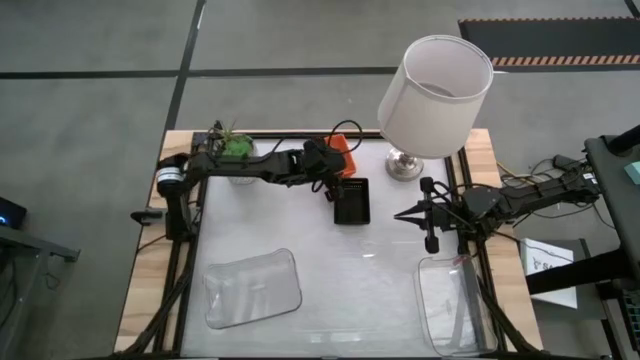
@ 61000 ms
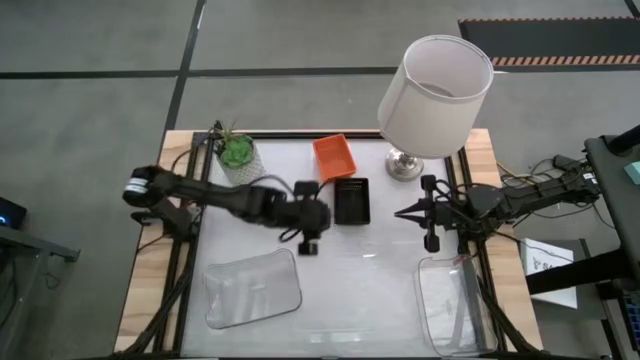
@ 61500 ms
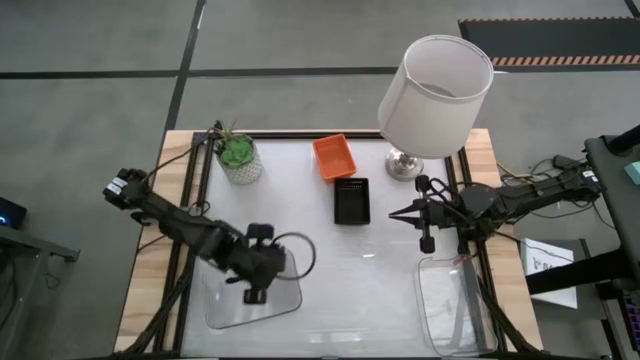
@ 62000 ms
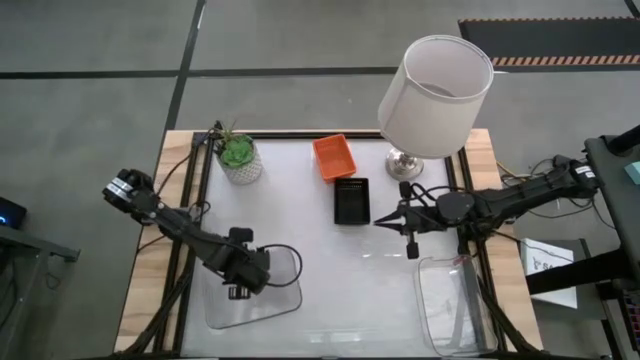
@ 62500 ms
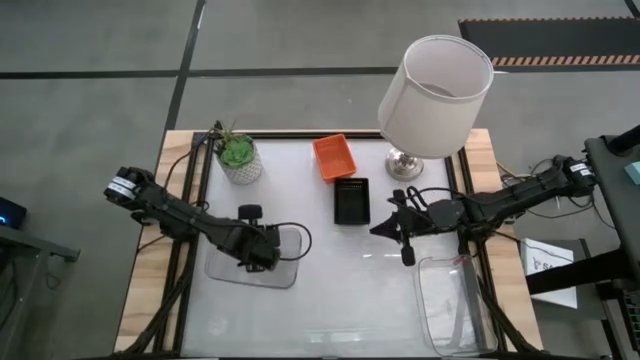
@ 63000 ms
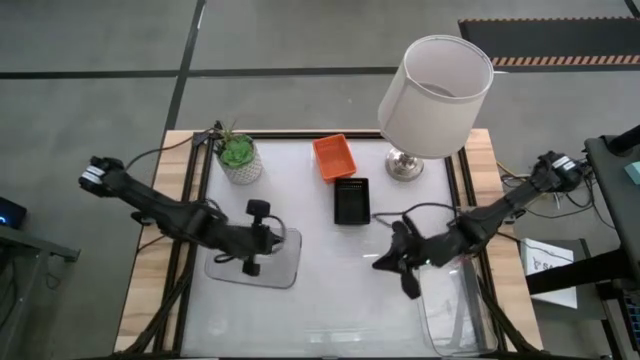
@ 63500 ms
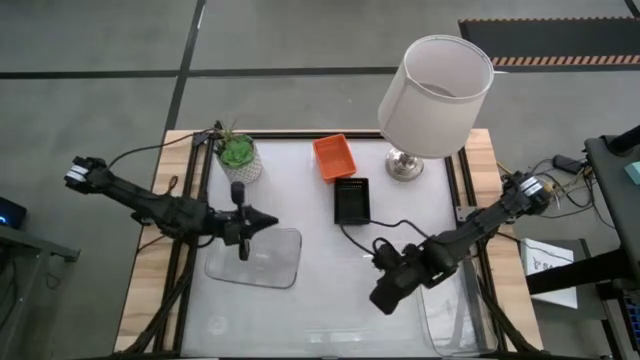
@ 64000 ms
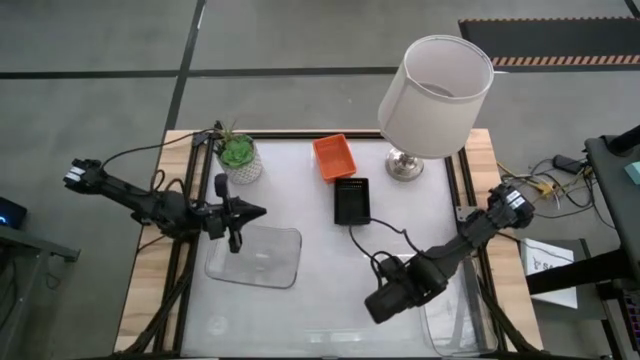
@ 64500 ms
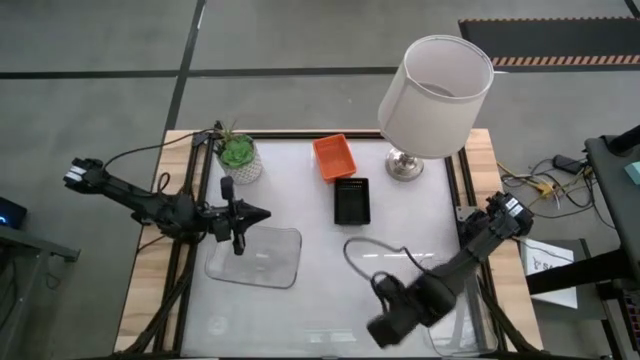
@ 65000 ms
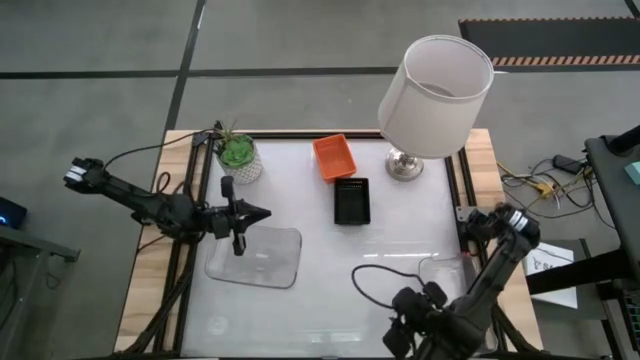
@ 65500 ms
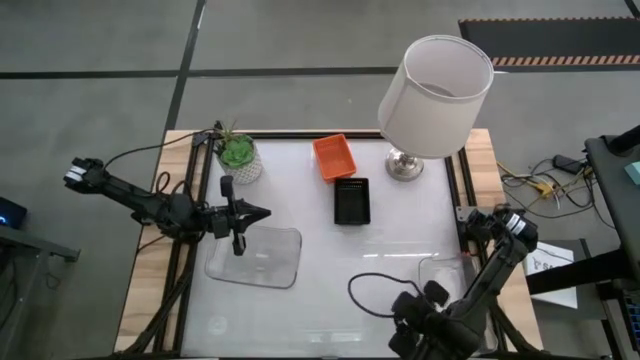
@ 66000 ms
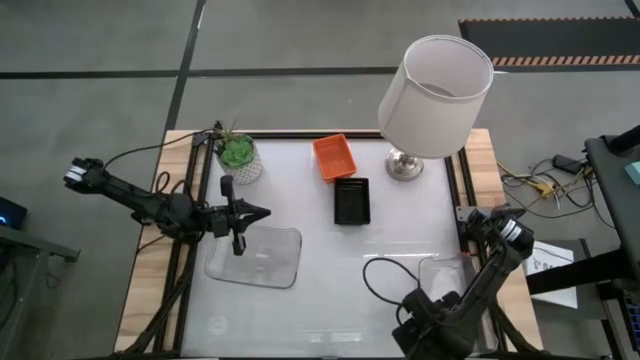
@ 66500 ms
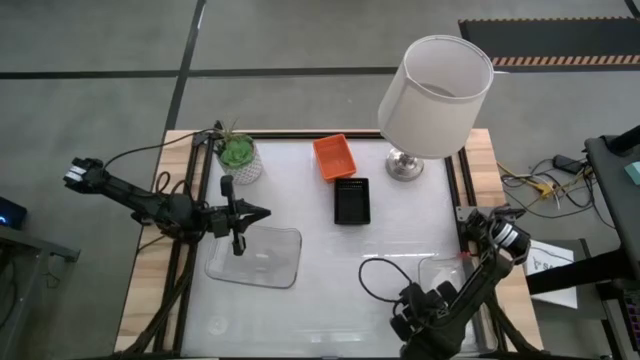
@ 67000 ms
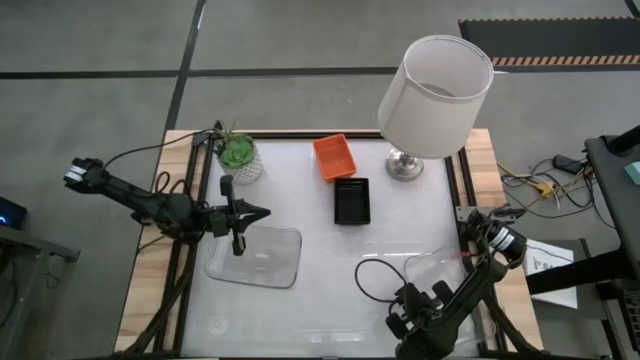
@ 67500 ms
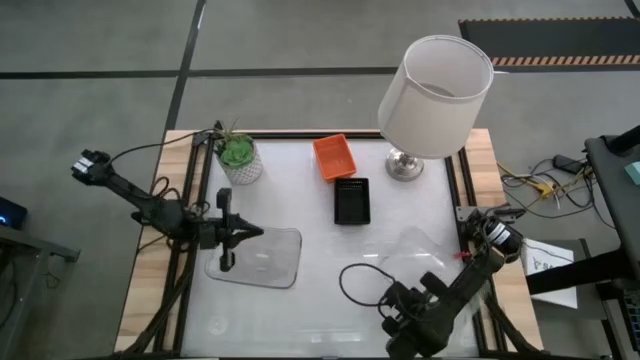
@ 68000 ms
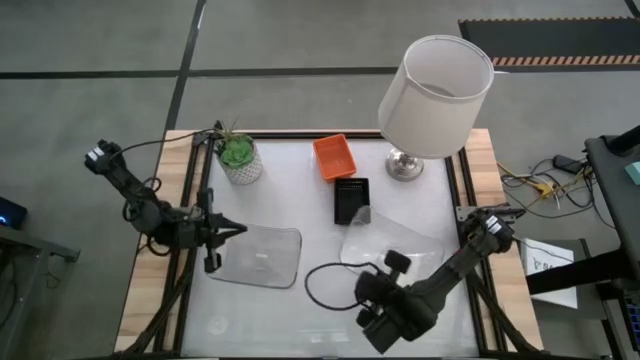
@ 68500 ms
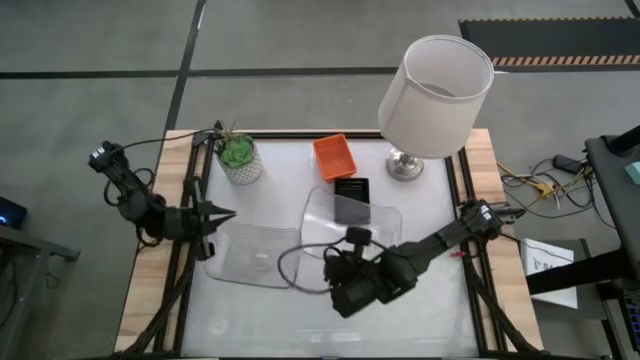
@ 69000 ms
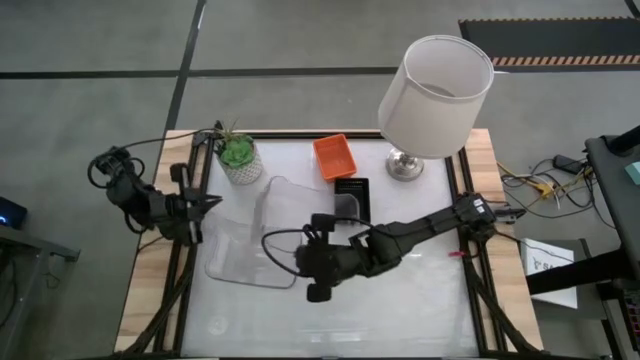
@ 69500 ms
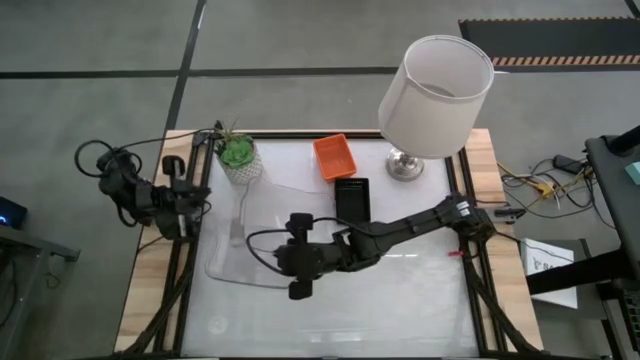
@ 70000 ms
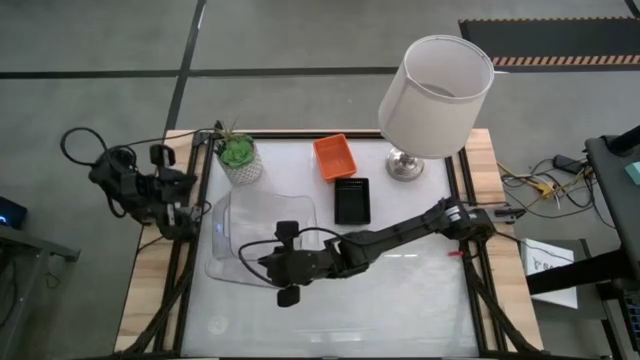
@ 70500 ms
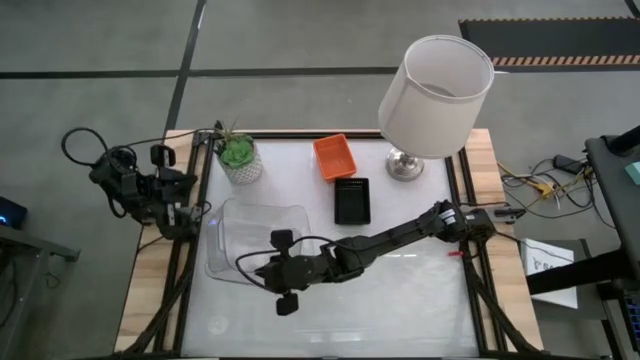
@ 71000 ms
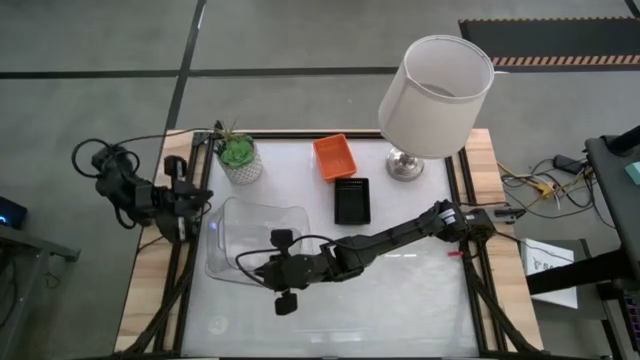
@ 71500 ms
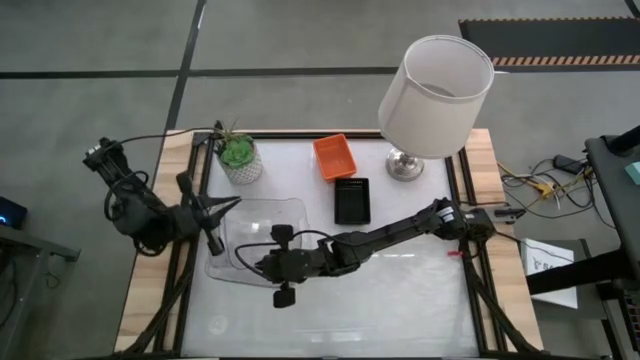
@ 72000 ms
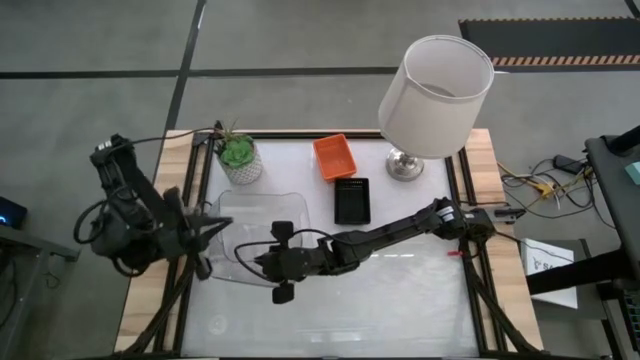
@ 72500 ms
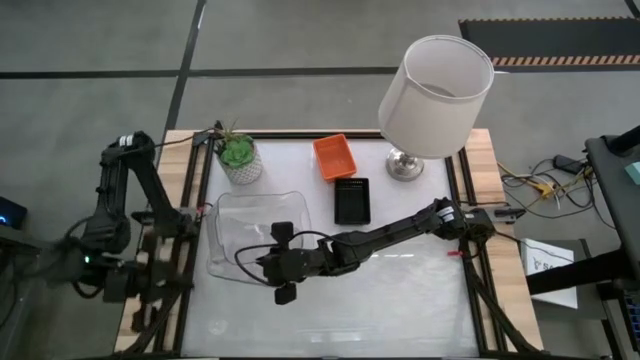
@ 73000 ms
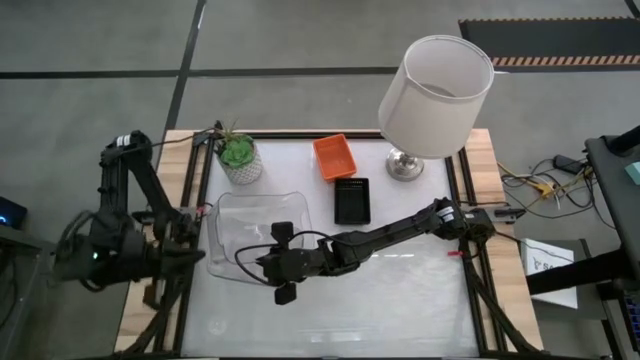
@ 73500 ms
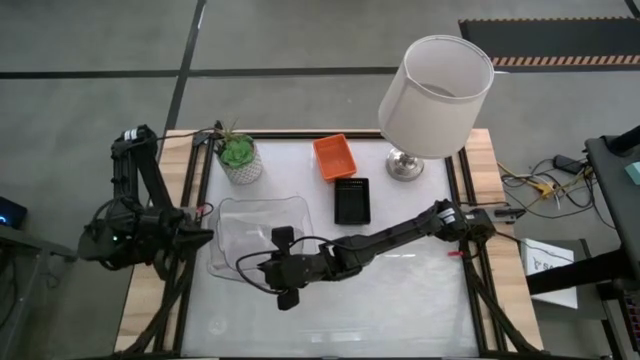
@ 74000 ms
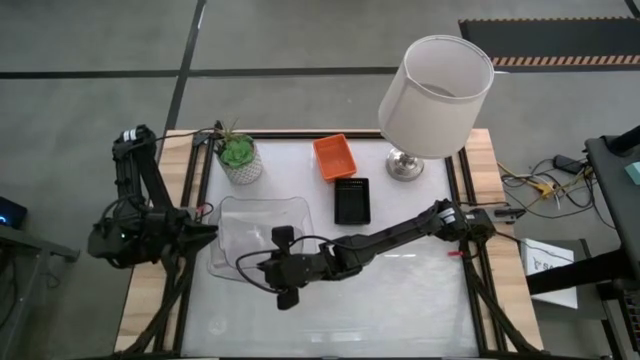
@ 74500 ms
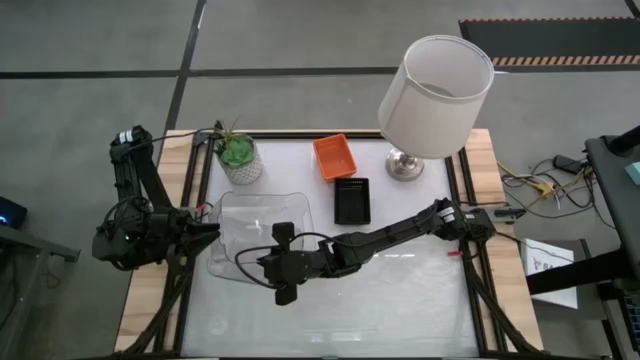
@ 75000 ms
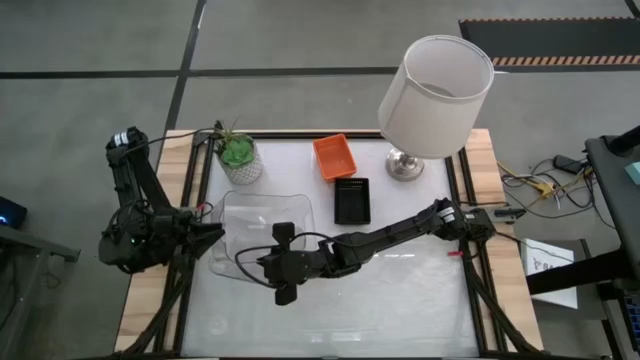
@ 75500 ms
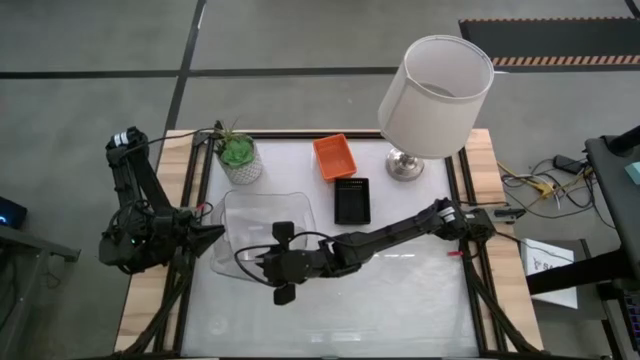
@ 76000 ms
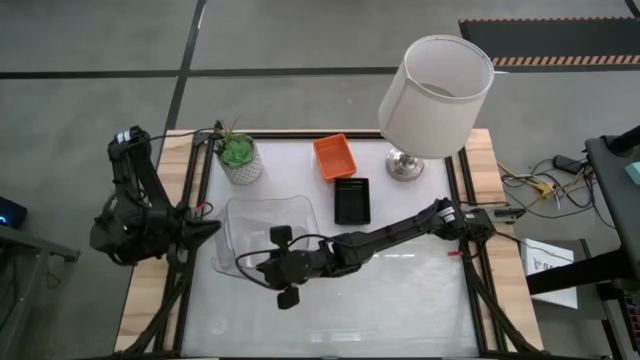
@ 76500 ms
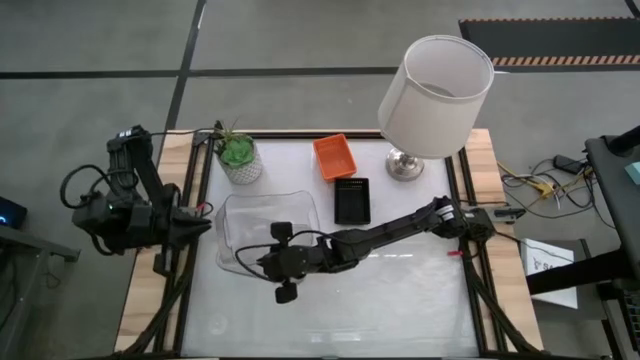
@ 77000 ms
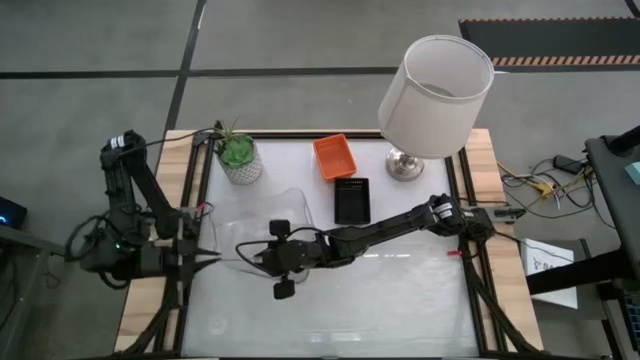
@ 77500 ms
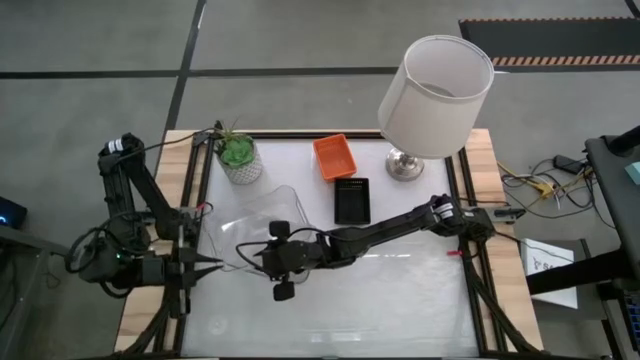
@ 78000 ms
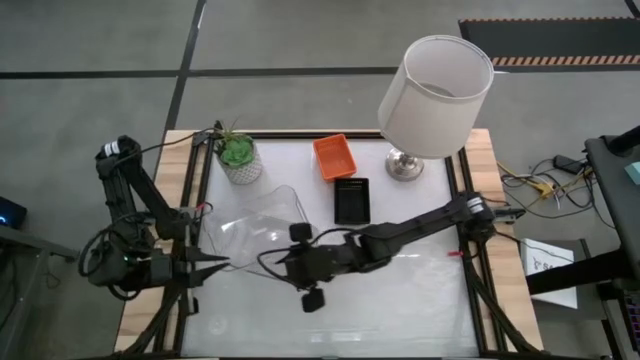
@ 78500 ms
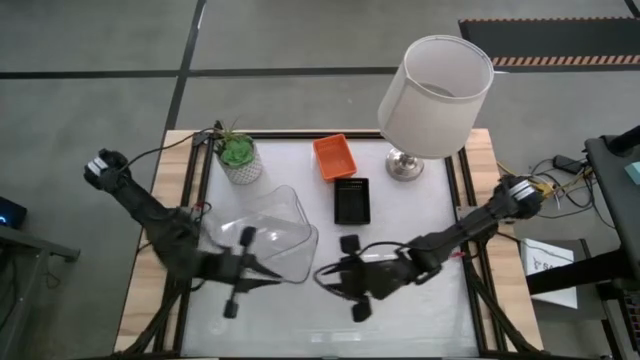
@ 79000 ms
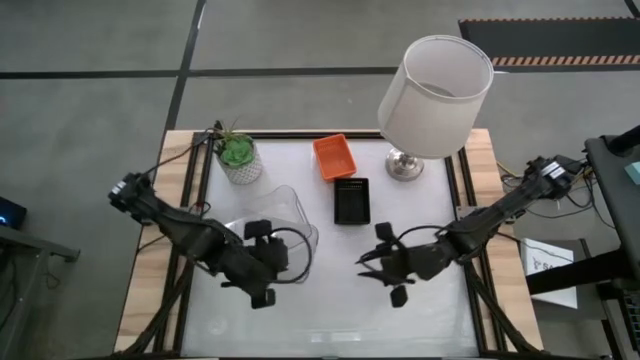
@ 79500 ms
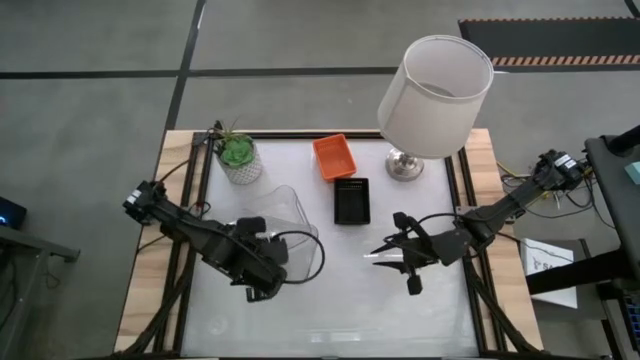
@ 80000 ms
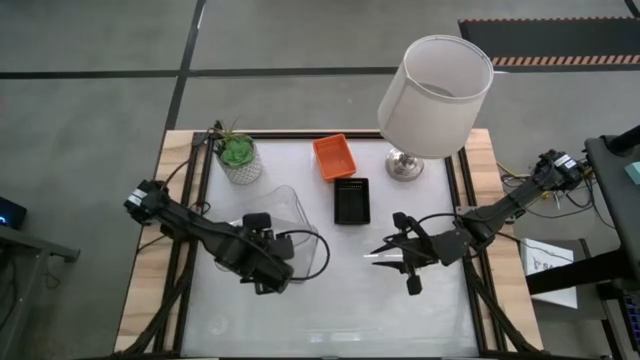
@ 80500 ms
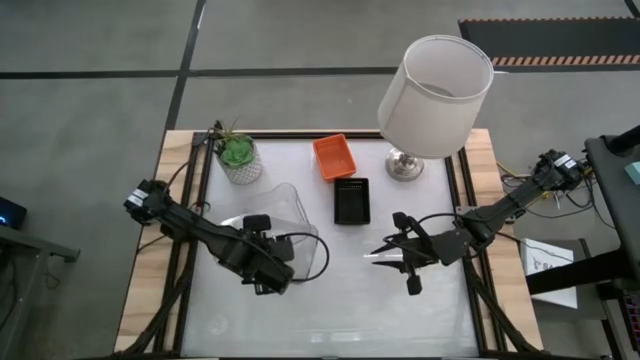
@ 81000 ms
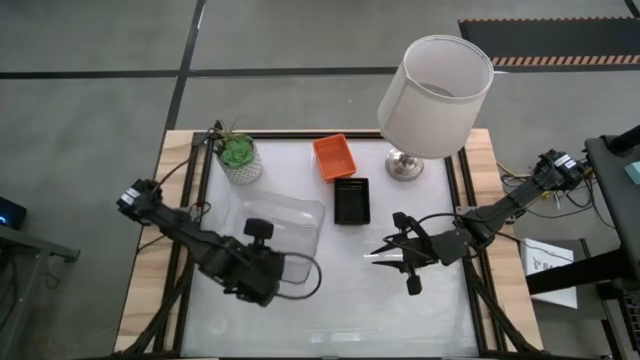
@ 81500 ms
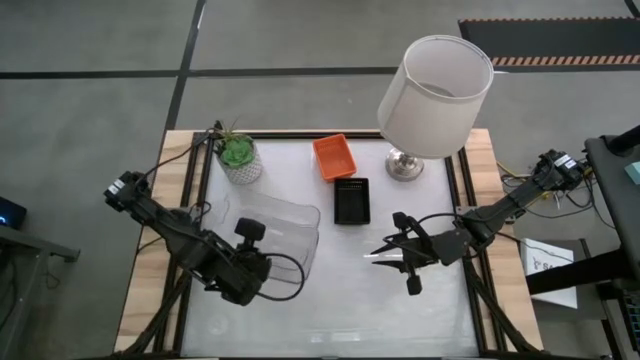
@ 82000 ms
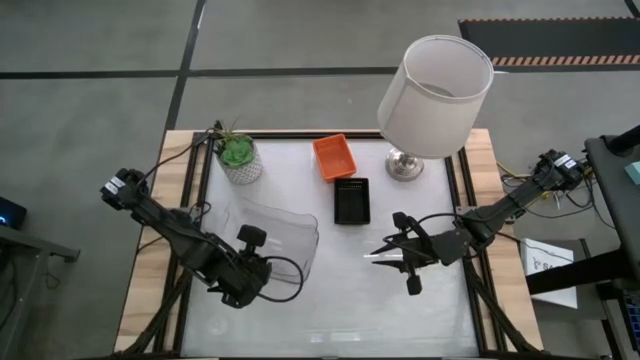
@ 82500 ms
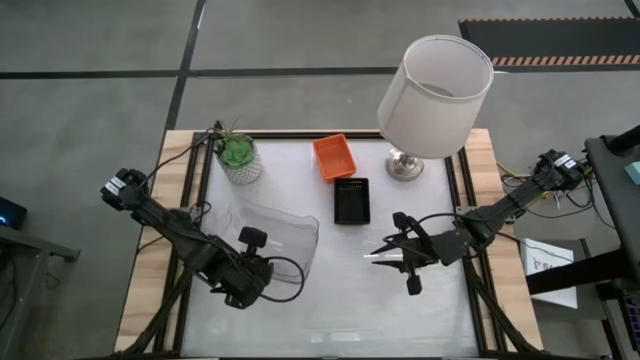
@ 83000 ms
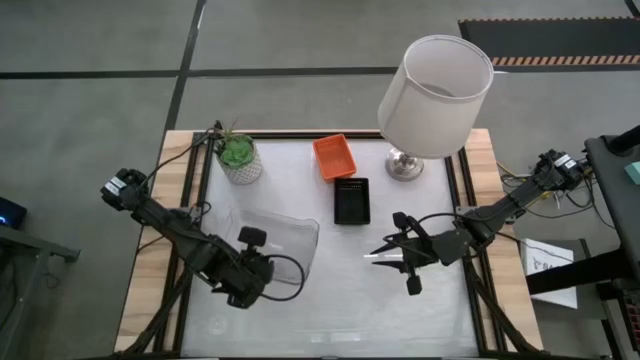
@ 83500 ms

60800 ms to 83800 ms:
Stack the right transparent bin on the stacked transparent bins
